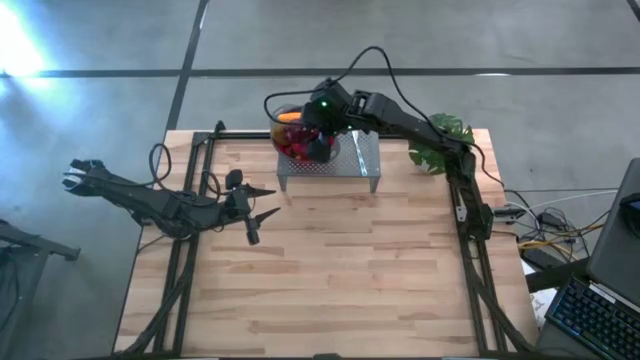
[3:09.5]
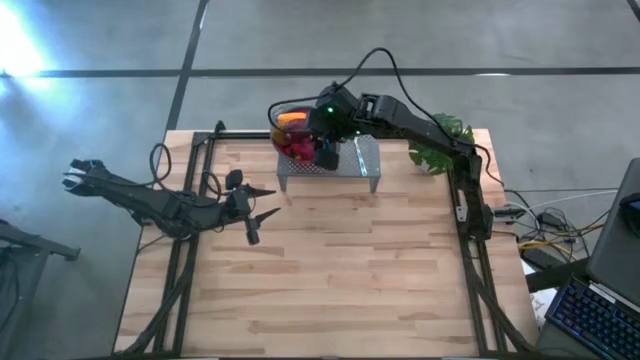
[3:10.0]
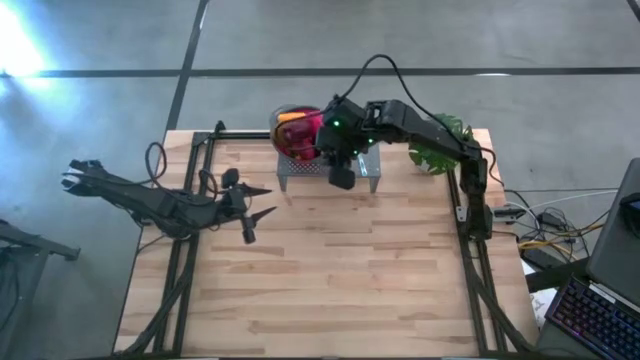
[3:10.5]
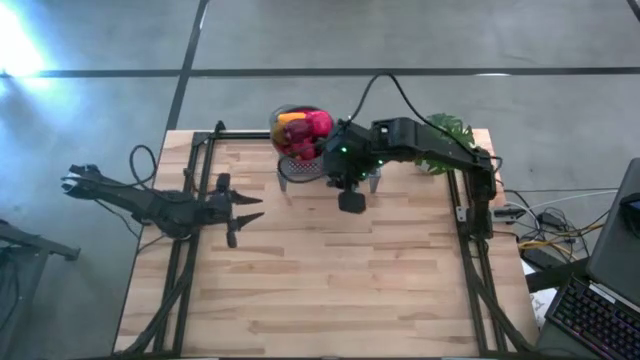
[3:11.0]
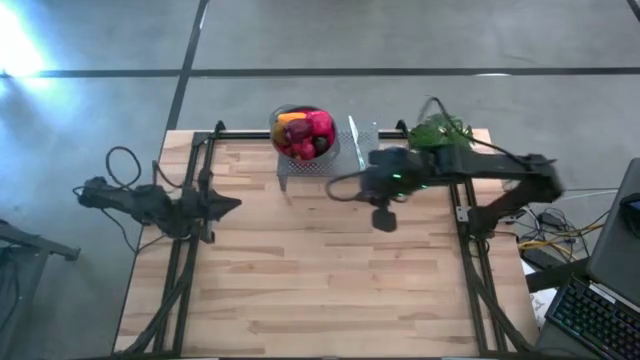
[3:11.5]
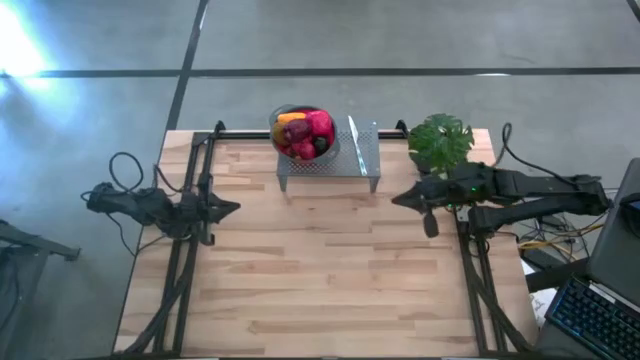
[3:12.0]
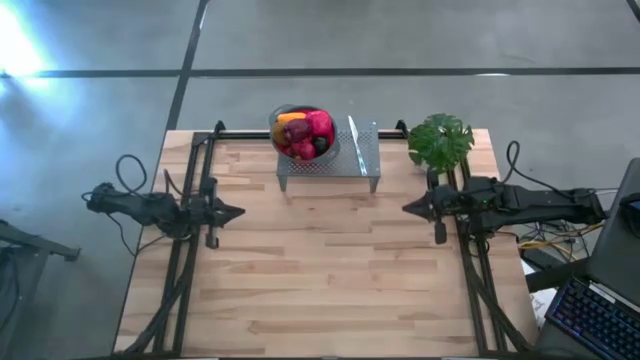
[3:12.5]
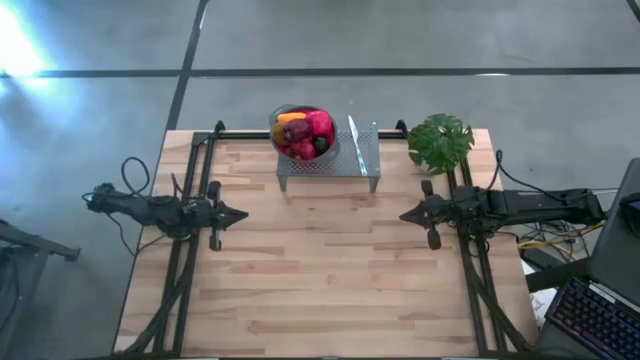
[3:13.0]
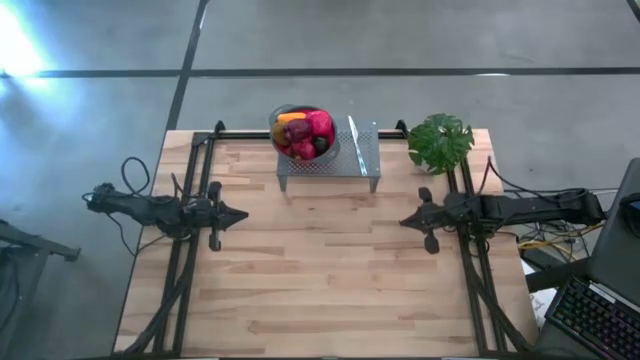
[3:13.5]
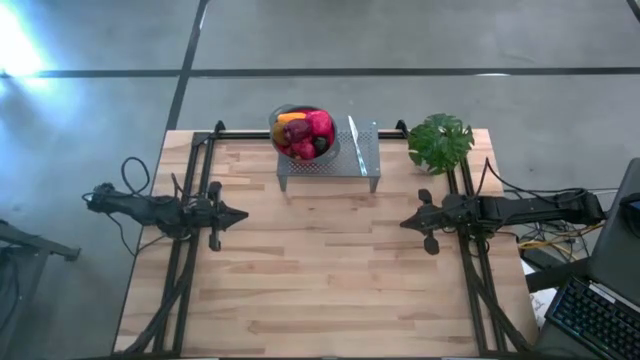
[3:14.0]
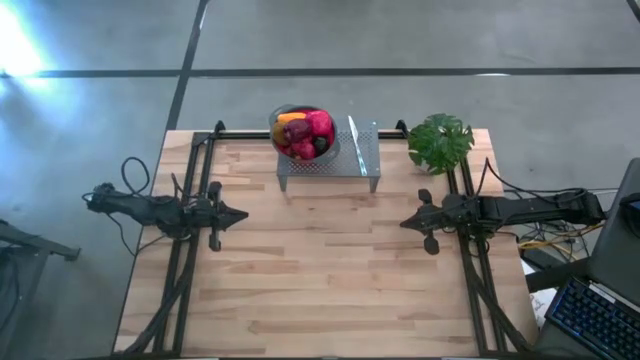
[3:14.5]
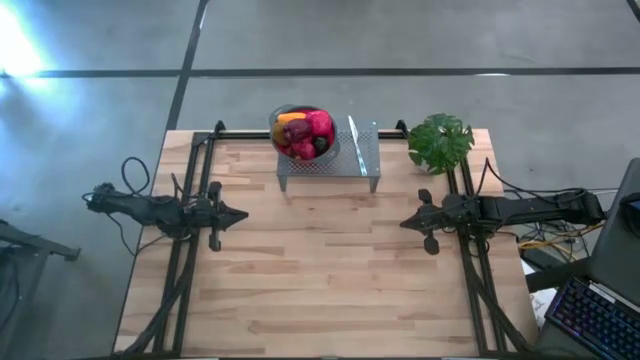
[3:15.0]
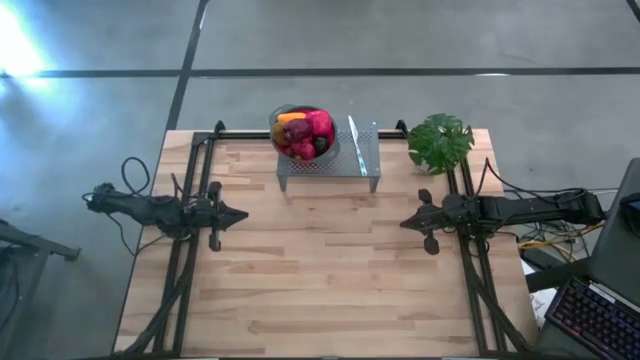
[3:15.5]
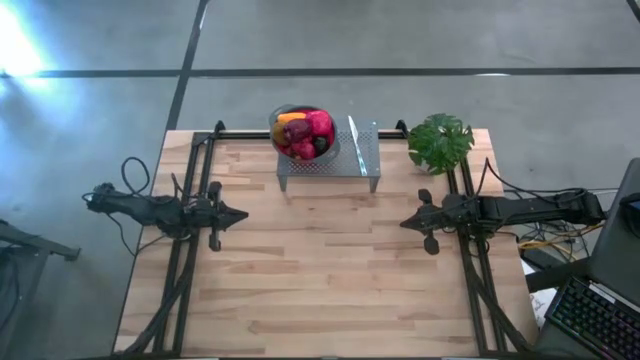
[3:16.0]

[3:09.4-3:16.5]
Task: Pick & Place Fruit
Return to Home Position

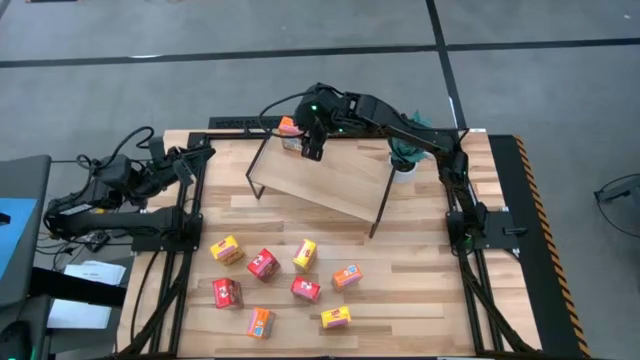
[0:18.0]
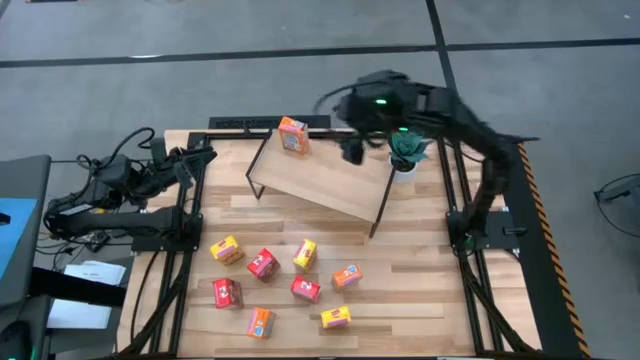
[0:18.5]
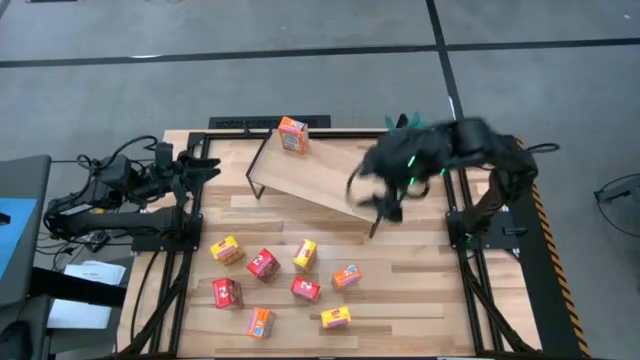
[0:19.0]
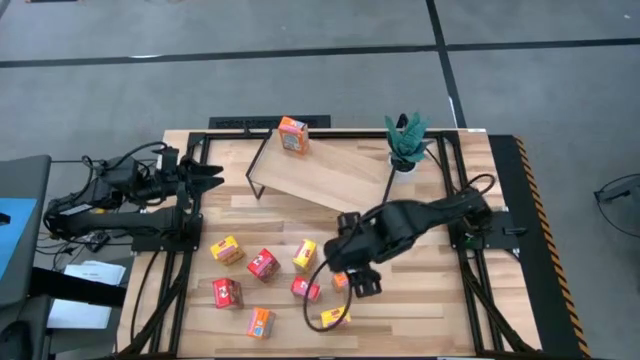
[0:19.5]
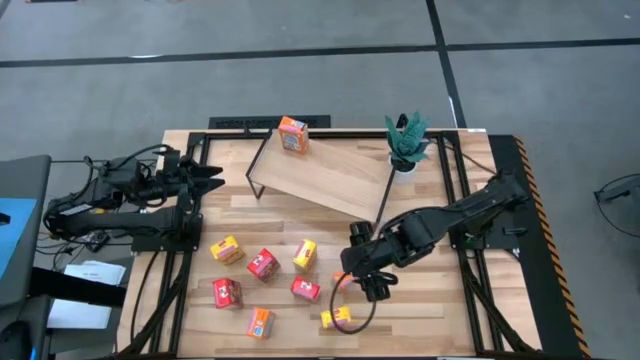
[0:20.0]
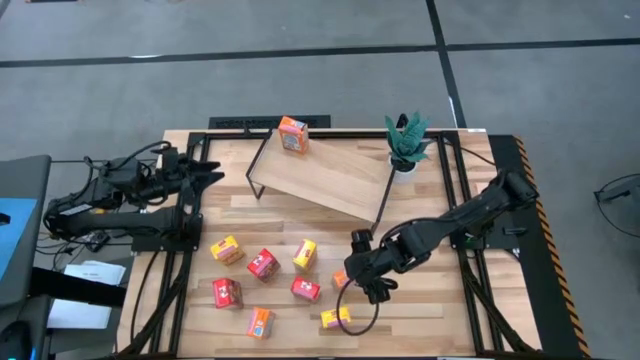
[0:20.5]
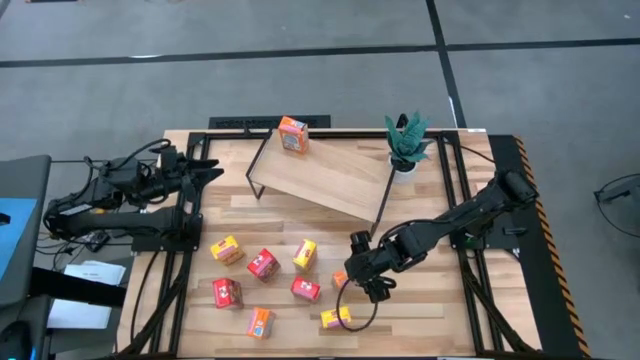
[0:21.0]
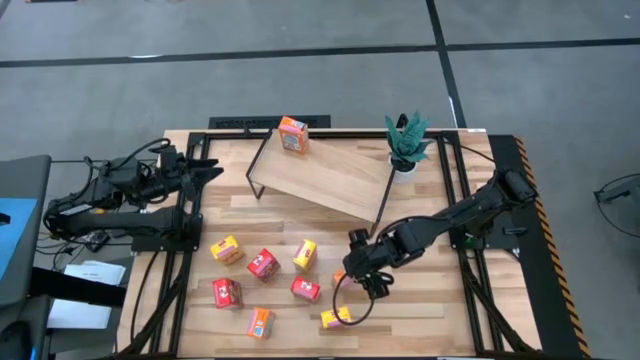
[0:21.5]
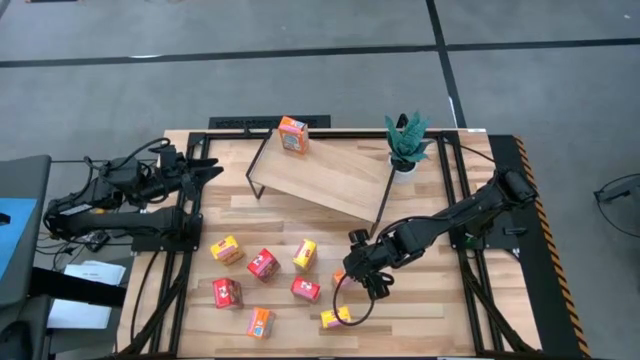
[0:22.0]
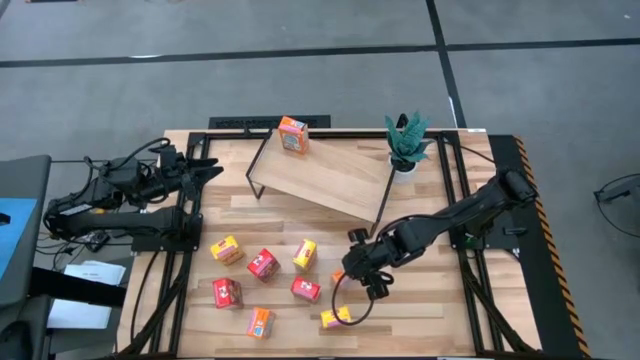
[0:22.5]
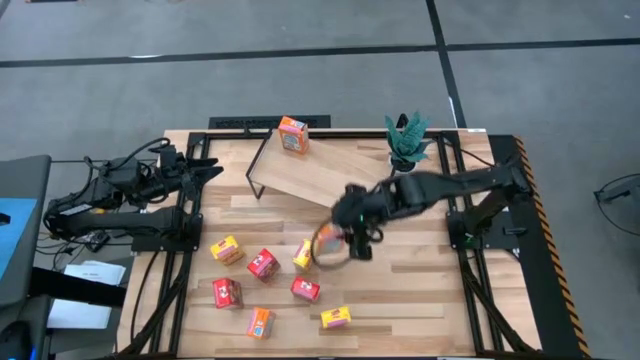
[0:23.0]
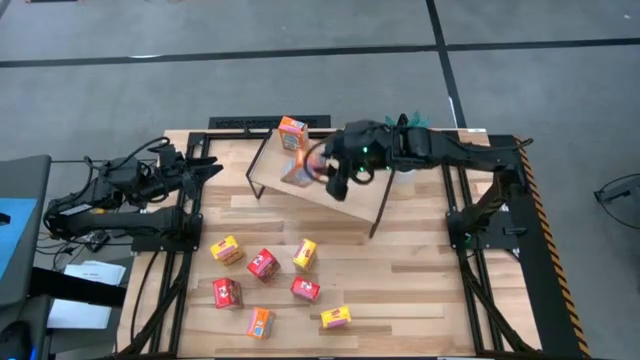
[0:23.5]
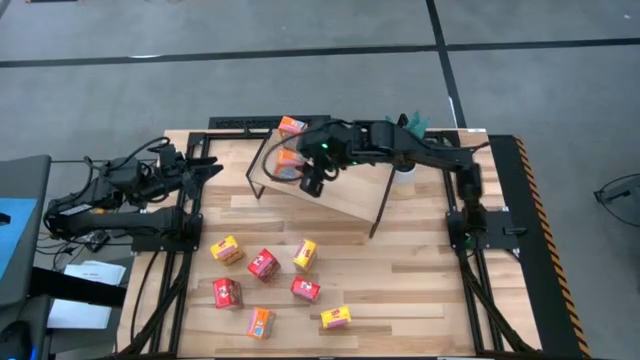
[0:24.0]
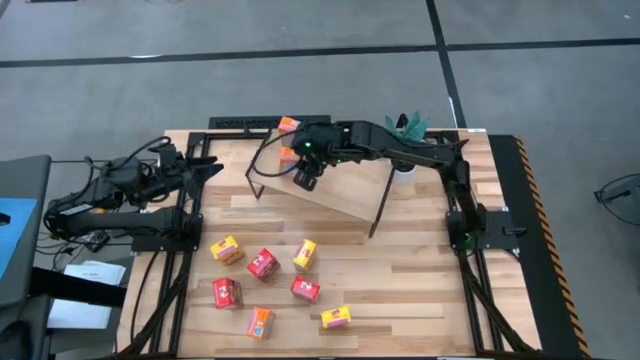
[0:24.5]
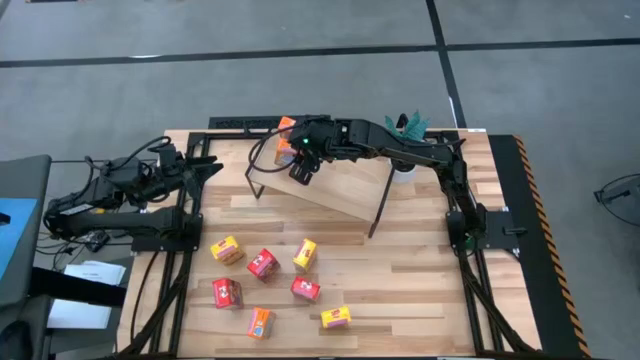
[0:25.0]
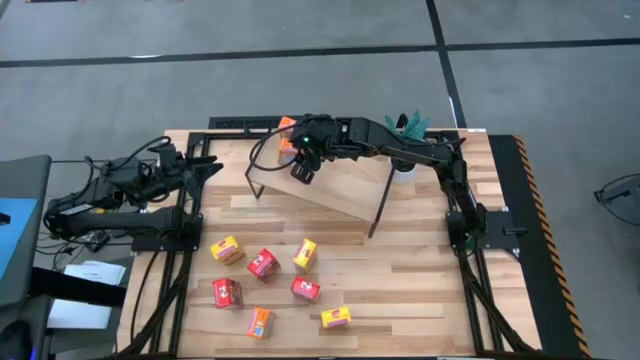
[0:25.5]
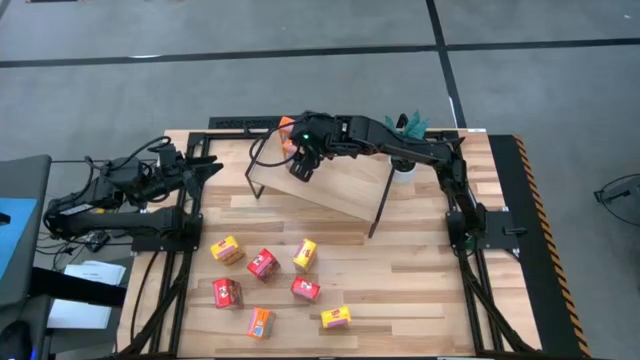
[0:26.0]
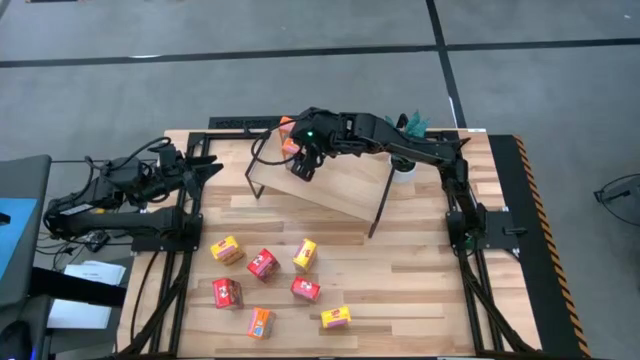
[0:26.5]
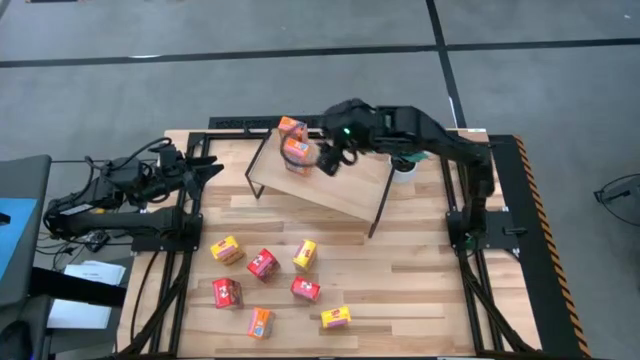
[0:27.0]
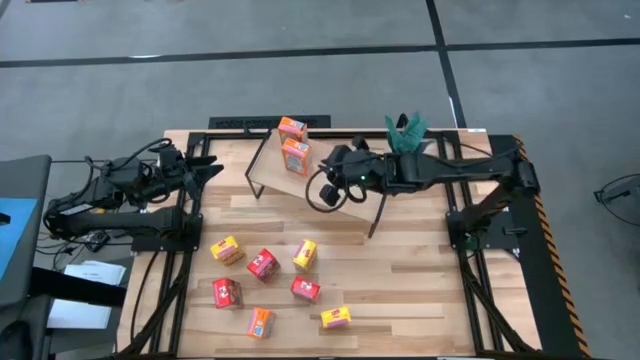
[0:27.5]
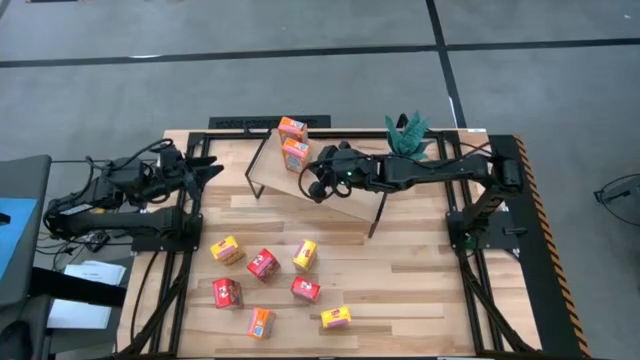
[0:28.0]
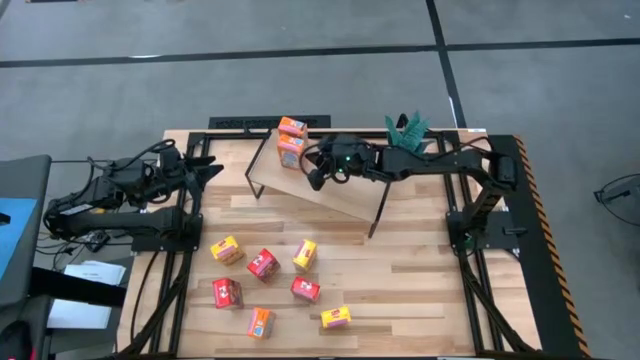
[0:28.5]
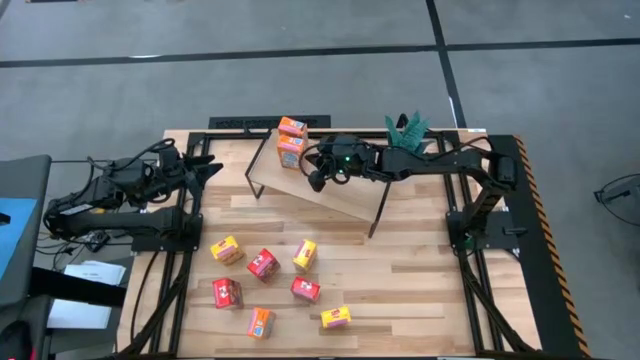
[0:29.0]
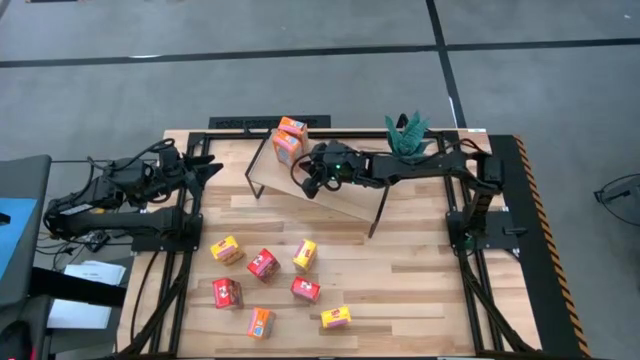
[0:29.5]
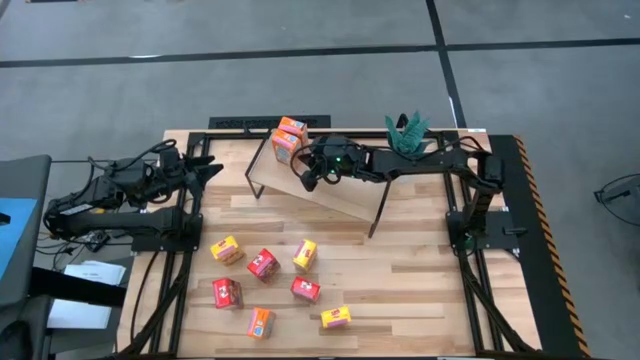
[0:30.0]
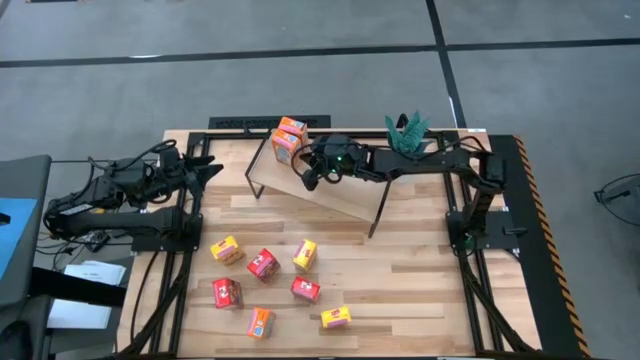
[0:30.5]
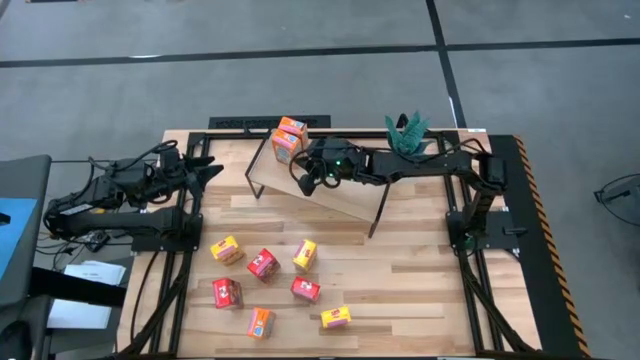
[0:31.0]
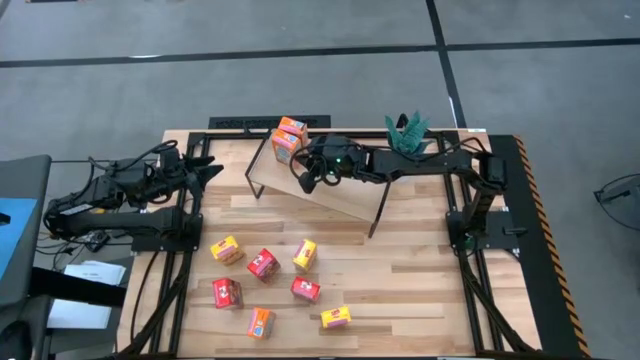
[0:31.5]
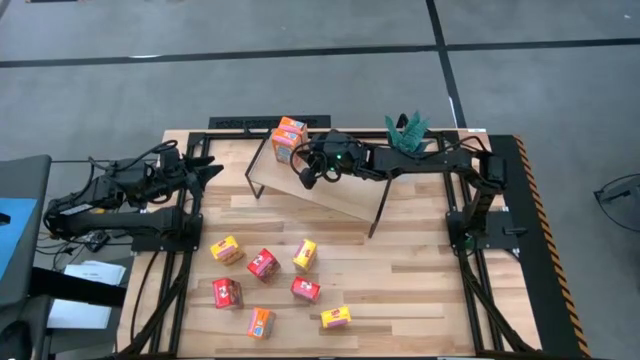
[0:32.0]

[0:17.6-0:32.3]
Task: Stack cereal on shelf
Put the right orange cereal box aligned with the other orange cereal box on the shelf
